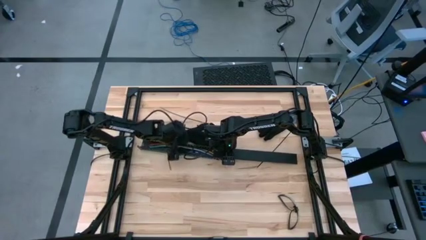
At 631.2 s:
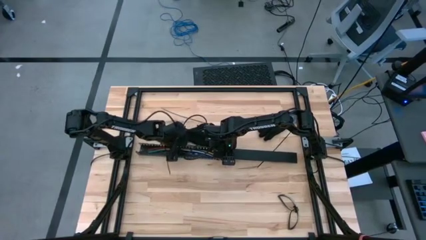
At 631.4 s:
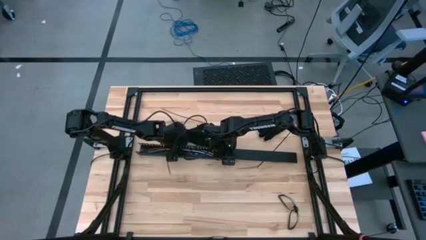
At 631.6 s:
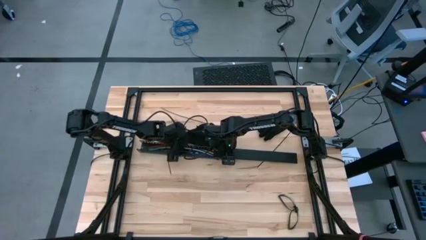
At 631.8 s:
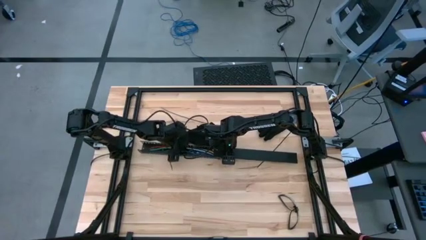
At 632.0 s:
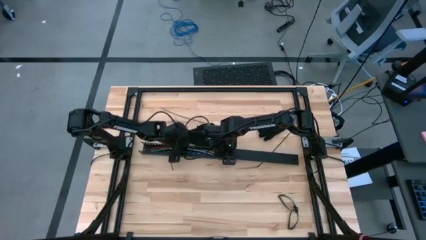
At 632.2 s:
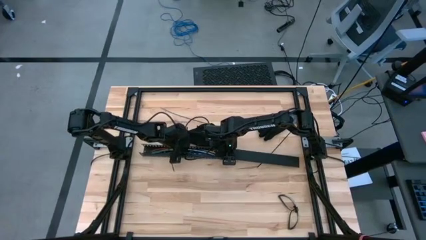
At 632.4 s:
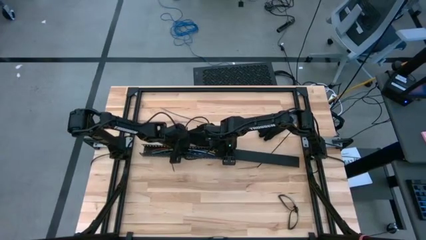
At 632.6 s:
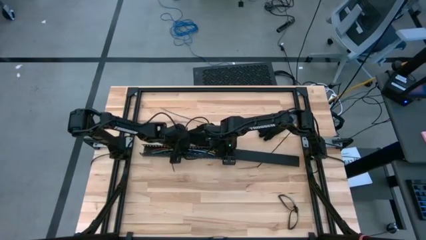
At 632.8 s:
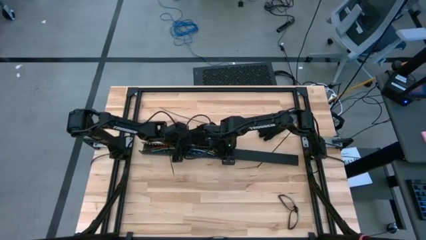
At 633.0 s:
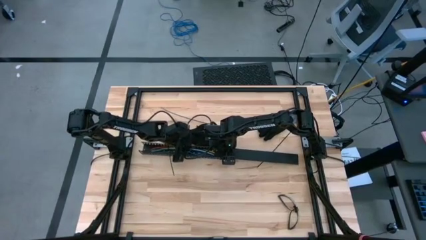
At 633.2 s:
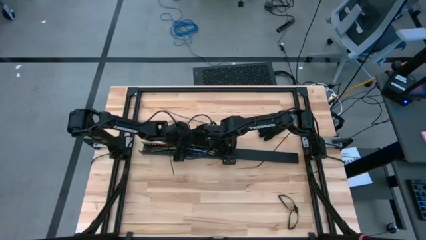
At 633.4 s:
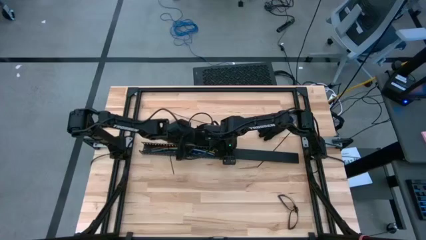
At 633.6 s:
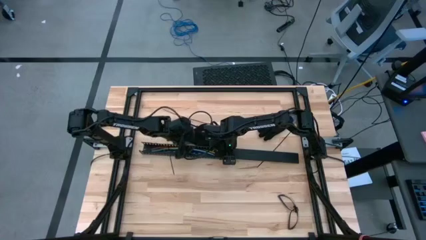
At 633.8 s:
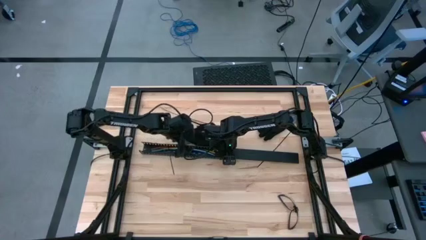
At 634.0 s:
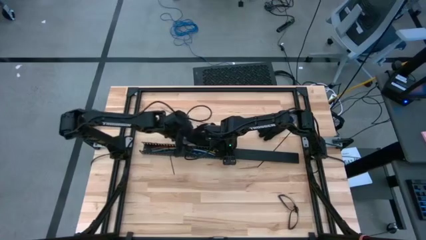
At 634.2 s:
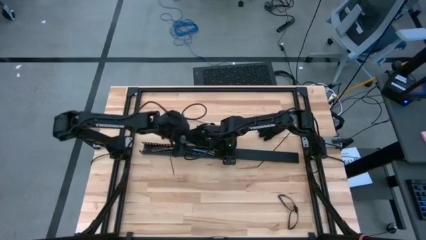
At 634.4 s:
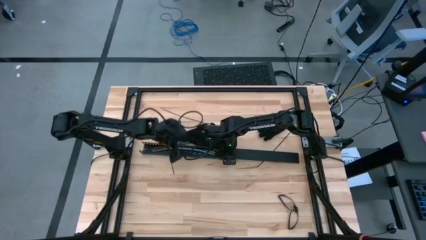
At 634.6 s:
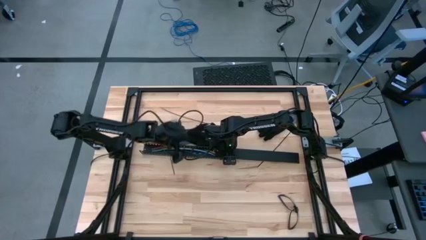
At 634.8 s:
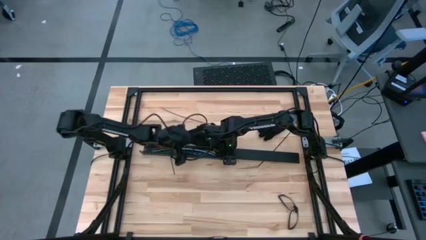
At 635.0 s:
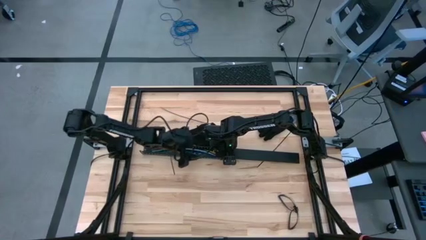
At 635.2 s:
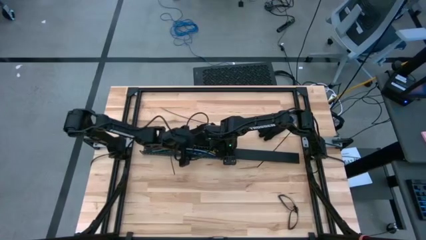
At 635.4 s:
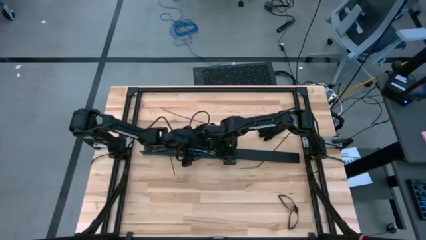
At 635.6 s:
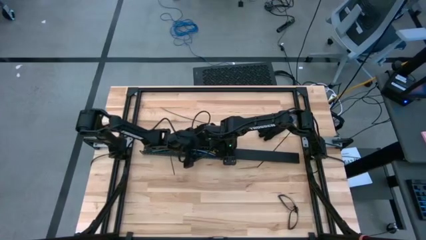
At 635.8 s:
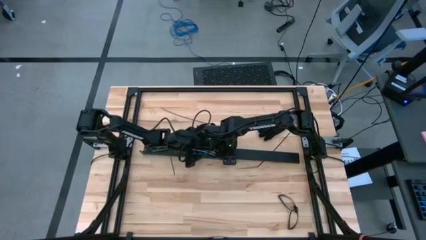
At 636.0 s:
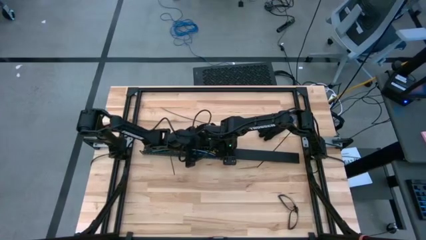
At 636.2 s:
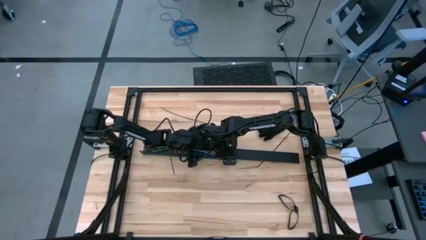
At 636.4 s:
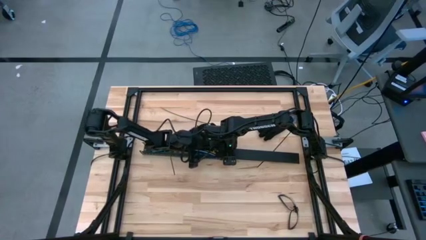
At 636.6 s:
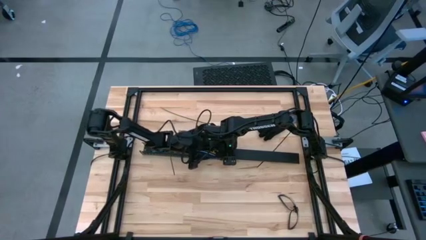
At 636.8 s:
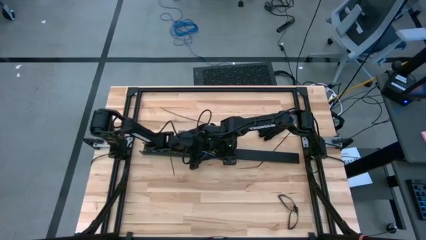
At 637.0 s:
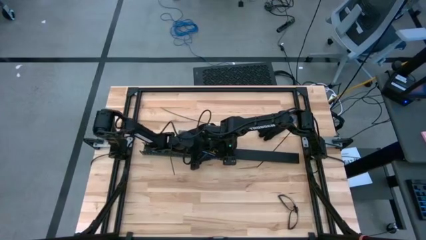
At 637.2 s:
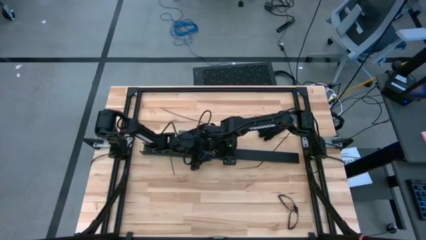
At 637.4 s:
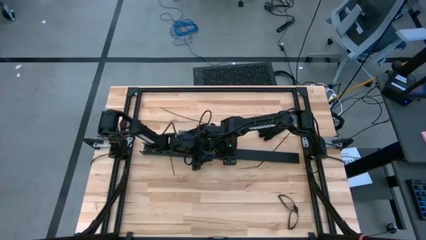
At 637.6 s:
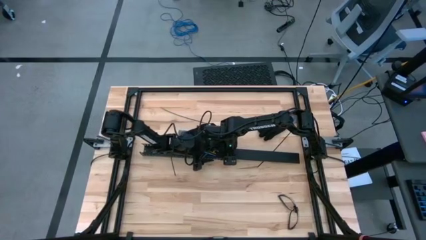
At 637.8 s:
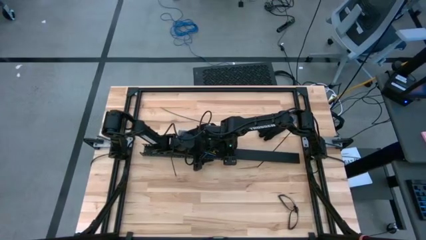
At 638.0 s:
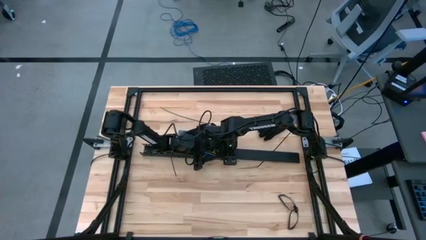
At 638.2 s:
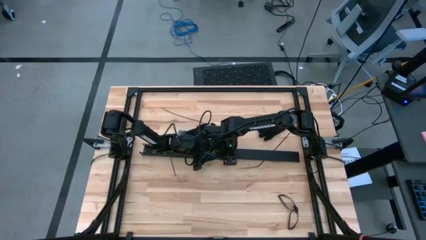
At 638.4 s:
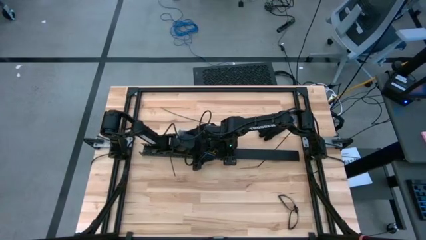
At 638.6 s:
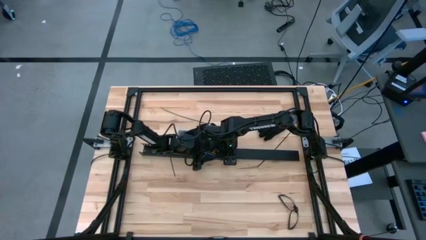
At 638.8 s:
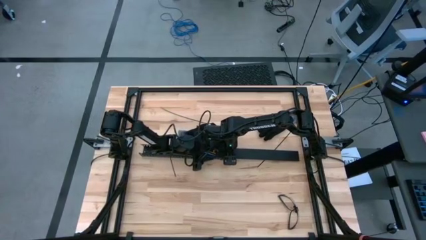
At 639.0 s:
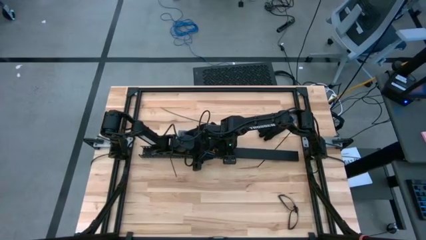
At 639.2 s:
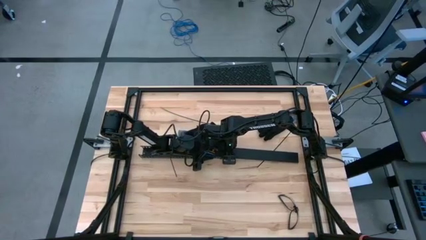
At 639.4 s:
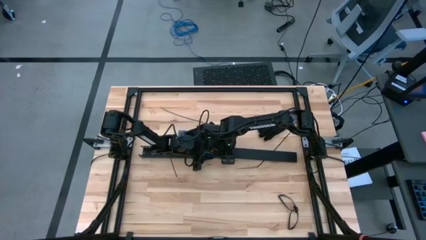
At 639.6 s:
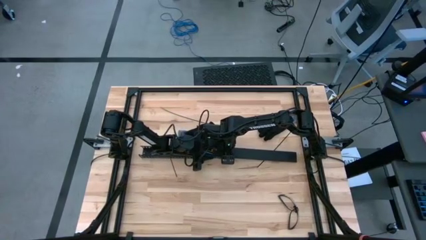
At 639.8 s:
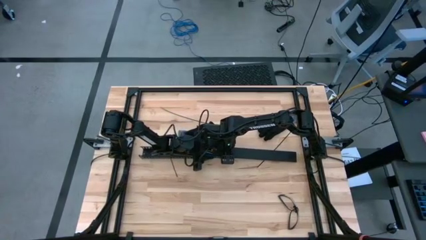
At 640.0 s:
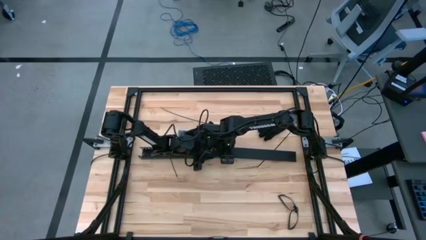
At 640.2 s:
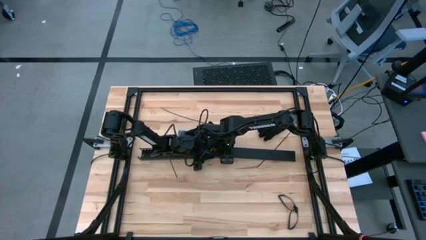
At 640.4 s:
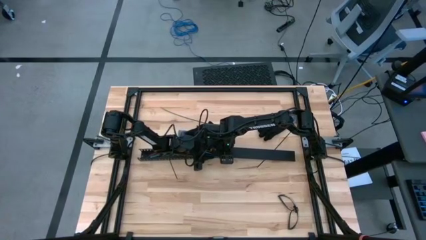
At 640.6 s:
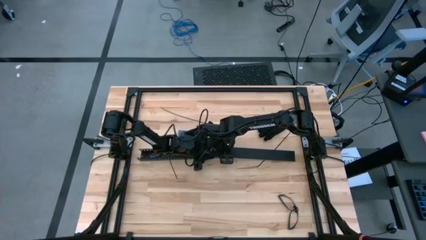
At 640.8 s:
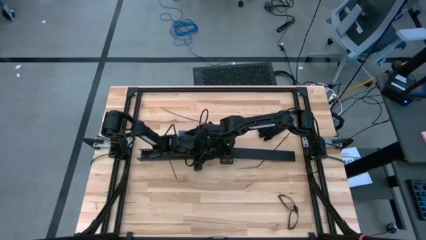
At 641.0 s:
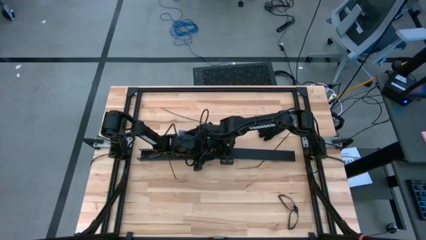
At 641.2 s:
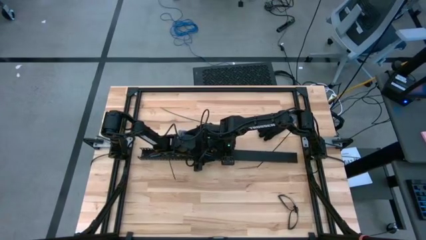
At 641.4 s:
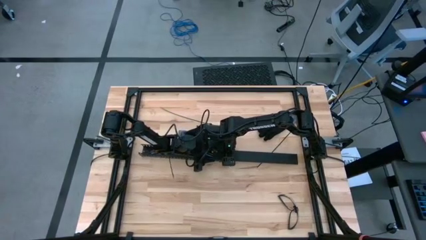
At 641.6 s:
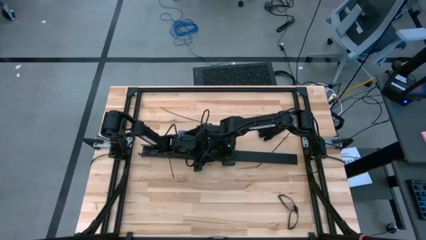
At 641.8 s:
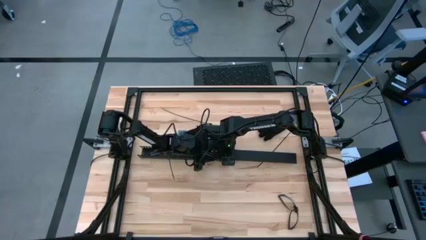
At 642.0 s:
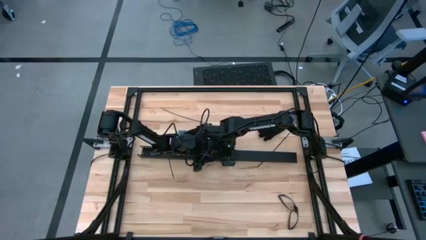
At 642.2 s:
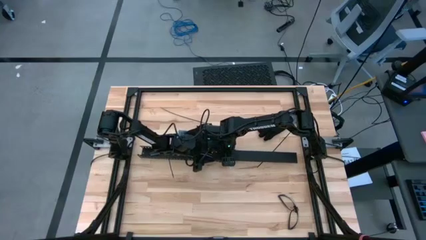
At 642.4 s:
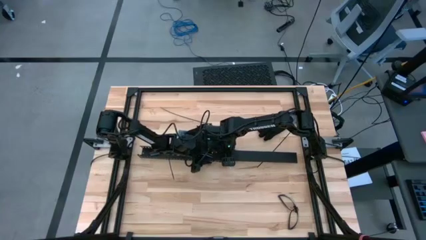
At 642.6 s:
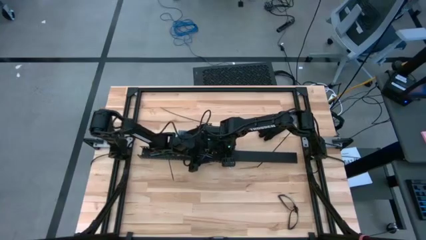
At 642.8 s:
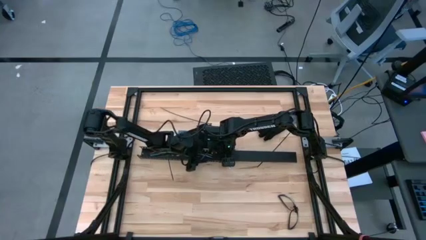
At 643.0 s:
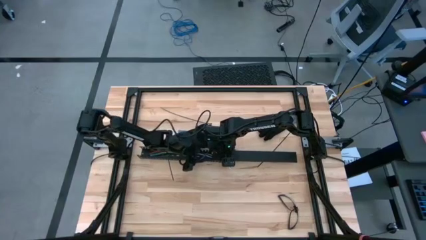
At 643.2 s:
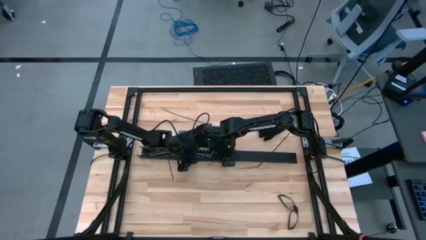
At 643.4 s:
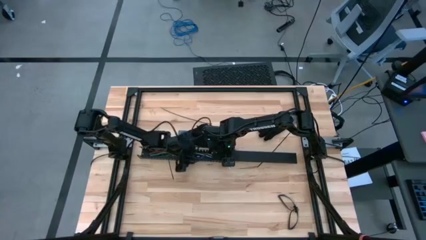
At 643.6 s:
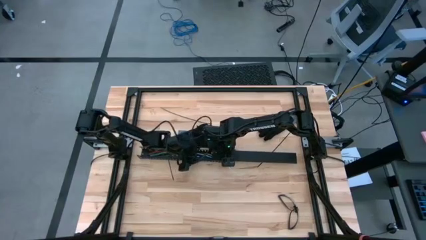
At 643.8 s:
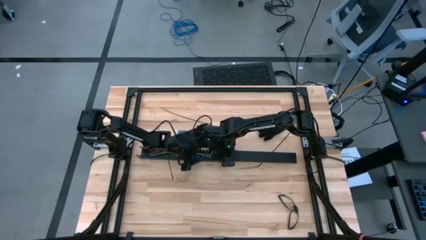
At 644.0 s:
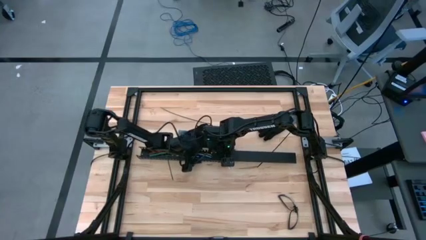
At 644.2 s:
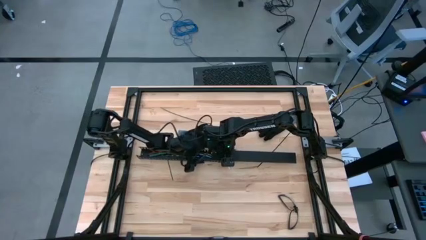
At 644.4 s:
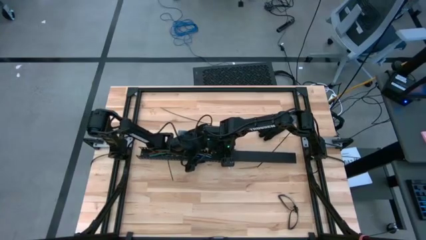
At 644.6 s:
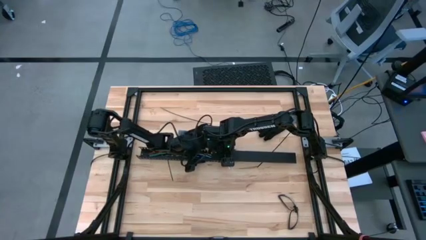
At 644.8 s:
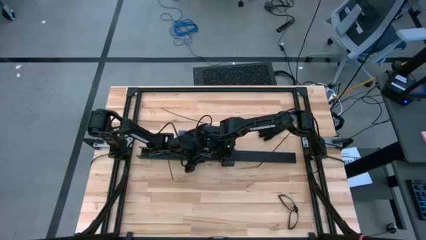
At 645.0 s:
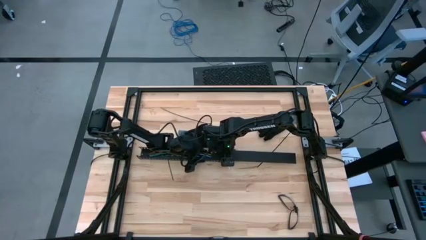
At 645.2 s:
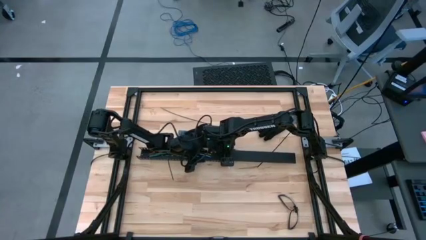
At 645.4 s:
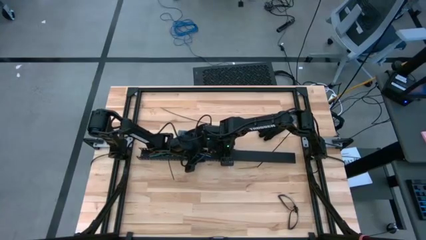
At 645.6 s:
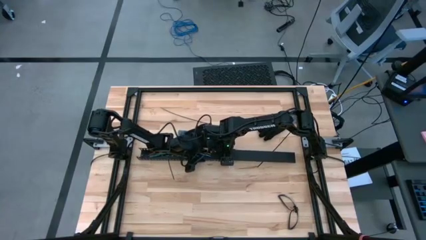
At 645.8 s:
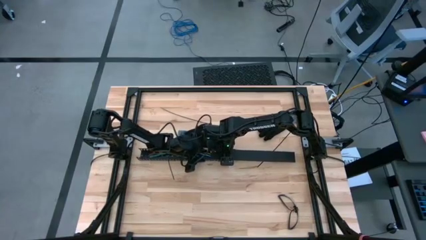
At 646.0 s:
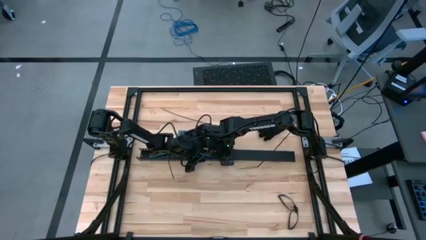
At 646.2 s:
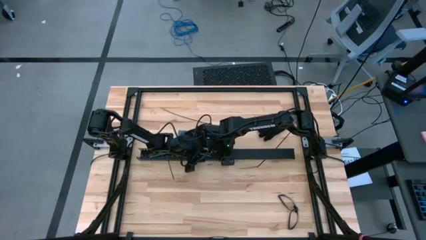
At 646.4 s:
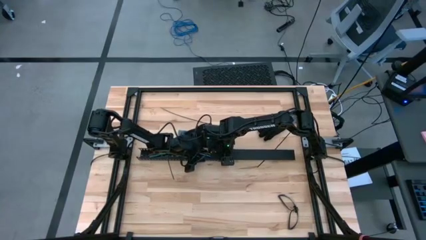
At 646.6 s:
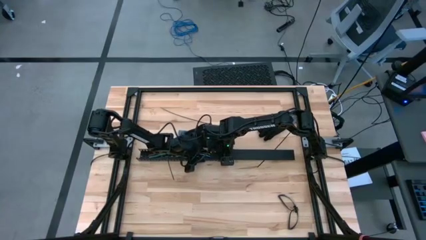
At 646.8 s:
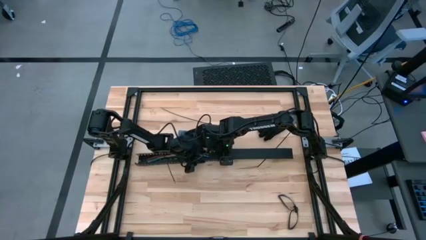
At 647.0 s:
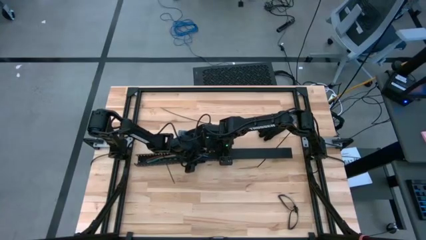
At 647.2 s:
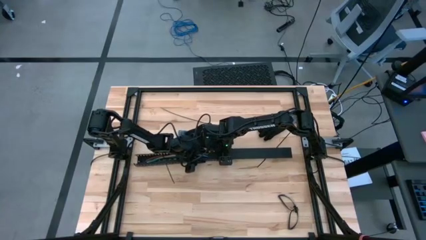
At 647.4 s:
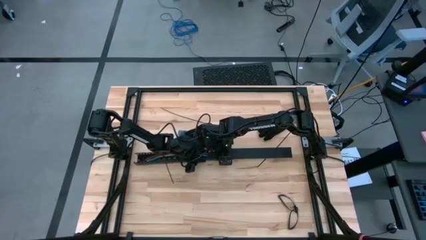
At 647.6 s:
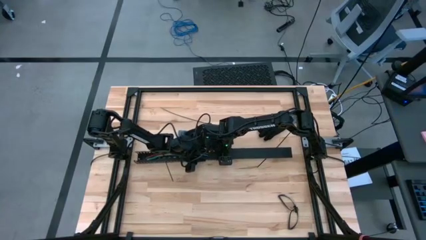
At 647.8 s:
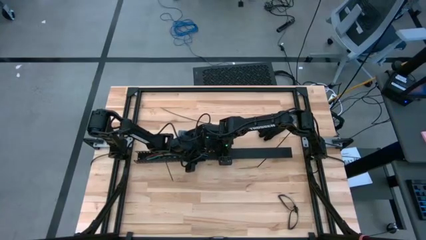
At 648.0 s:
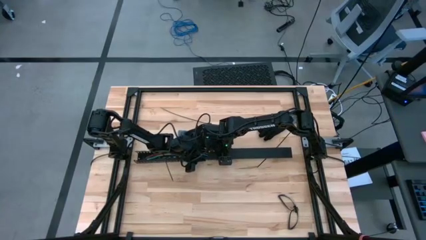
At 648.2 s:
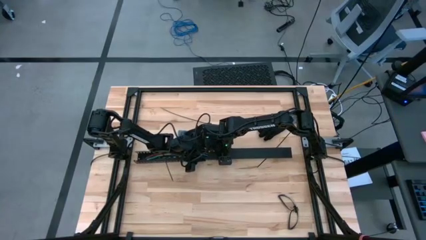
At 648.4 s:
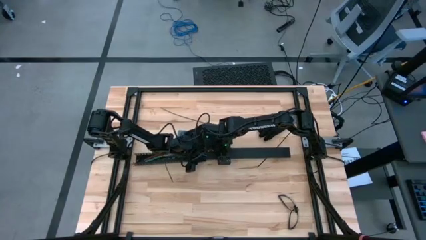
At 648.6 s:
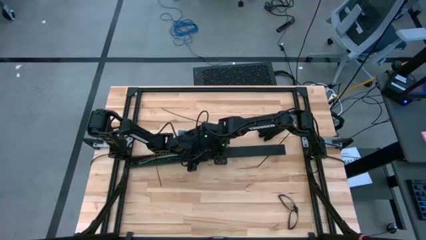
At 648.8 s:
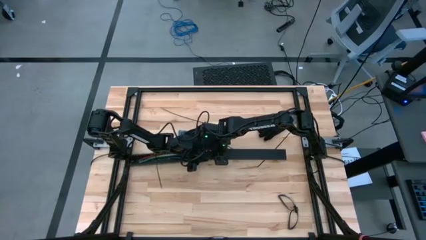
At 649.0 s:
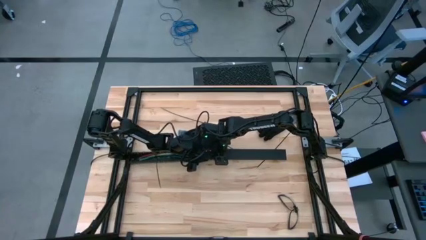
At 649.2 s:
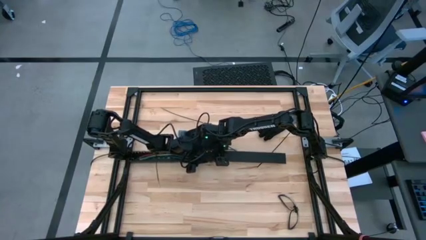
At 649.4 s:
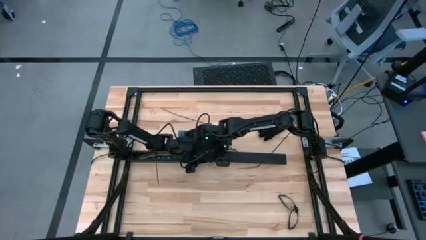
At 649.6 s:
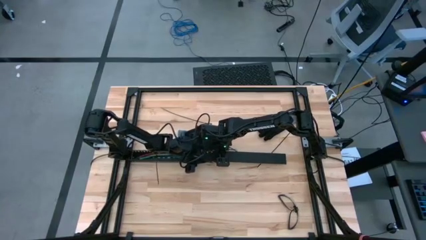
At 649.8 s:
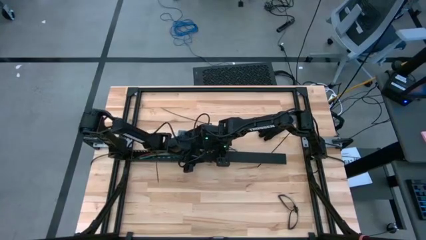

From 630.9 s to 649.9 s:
Task: Ziptie cables
Close the cable duct
